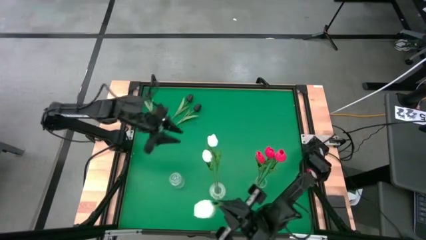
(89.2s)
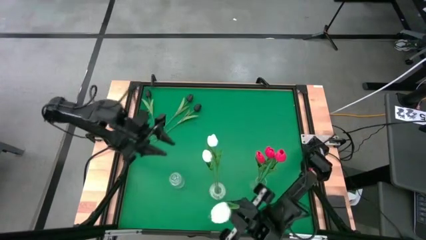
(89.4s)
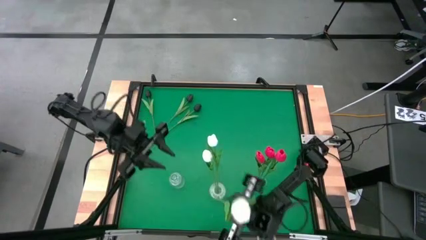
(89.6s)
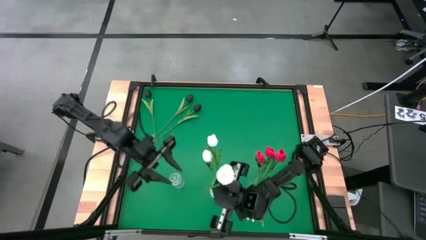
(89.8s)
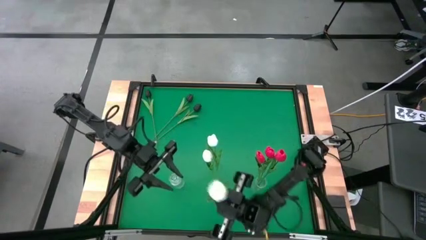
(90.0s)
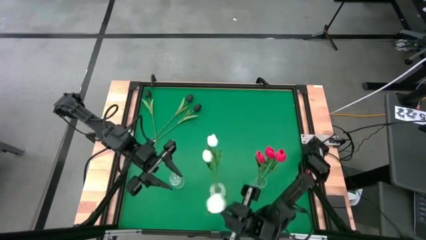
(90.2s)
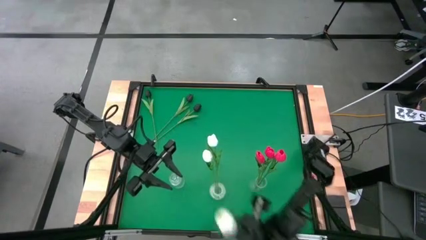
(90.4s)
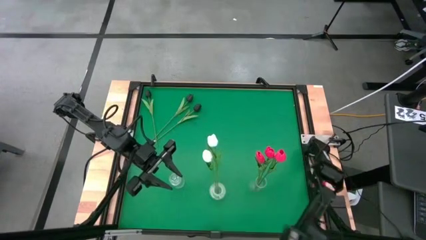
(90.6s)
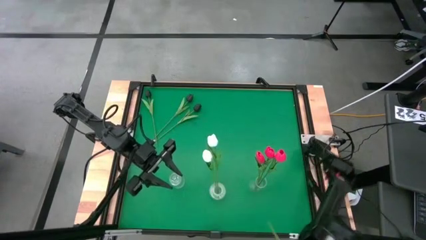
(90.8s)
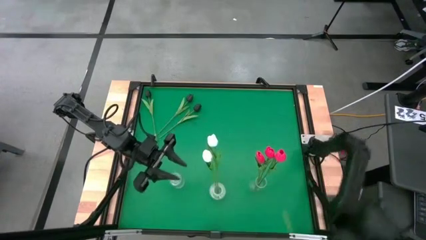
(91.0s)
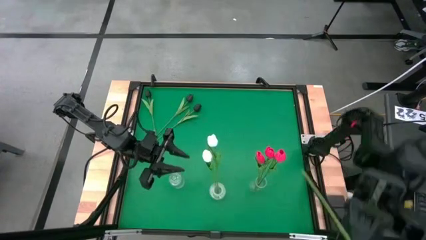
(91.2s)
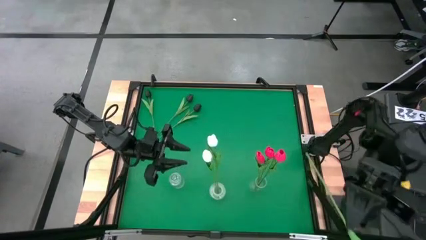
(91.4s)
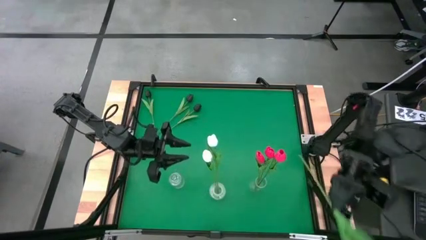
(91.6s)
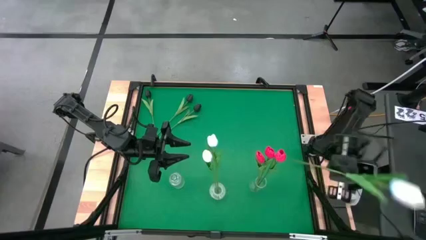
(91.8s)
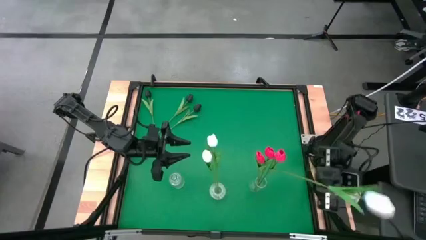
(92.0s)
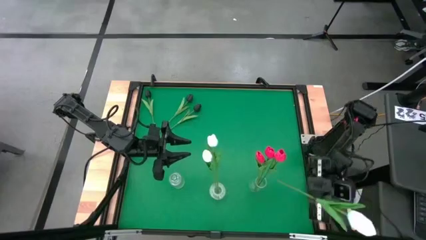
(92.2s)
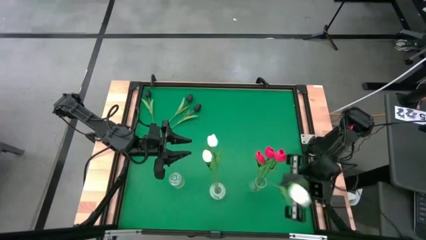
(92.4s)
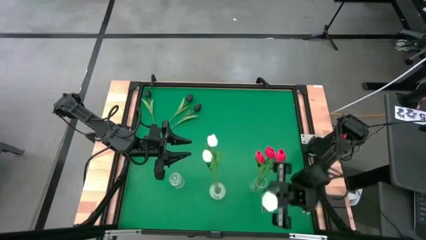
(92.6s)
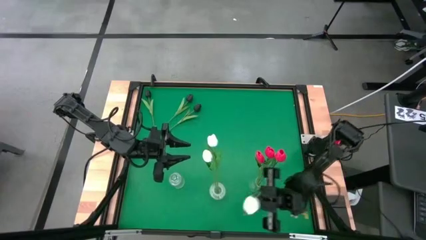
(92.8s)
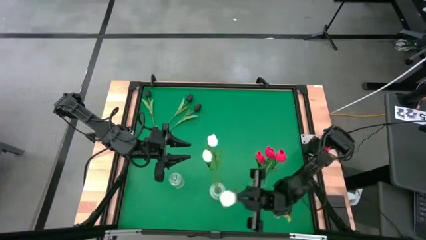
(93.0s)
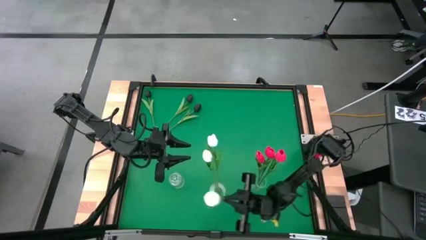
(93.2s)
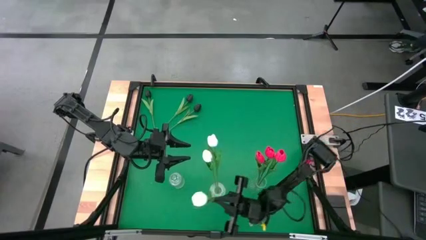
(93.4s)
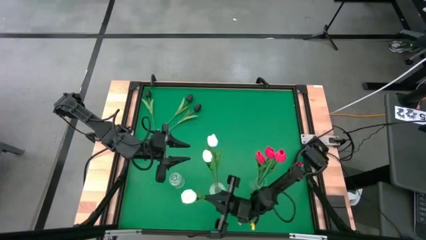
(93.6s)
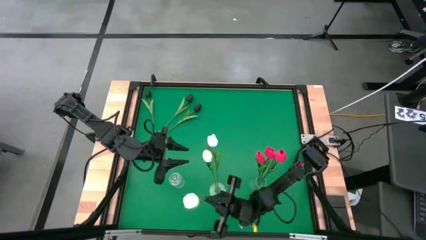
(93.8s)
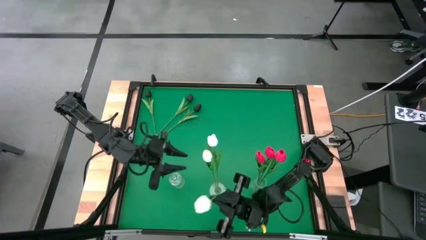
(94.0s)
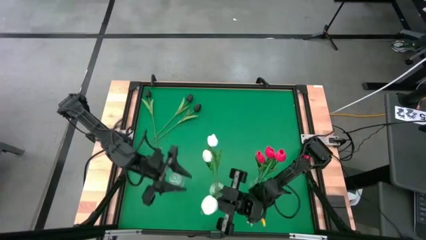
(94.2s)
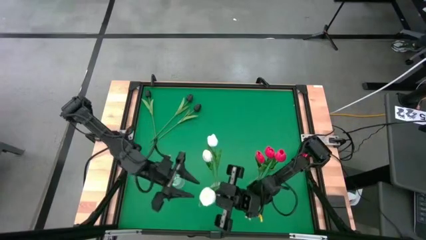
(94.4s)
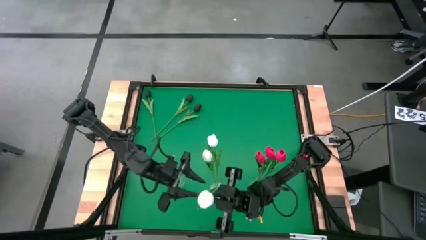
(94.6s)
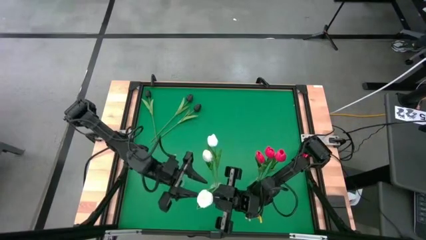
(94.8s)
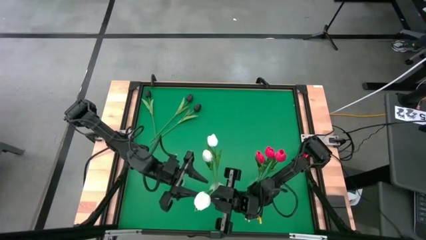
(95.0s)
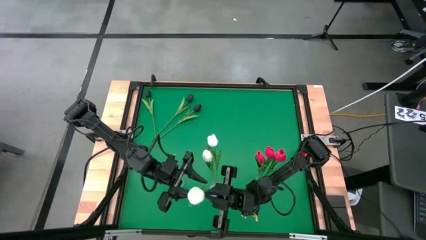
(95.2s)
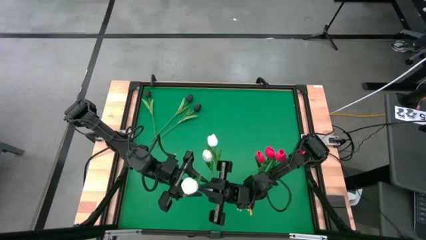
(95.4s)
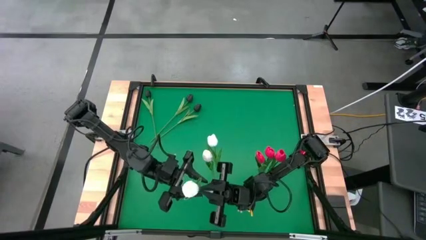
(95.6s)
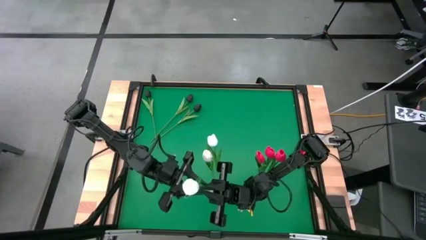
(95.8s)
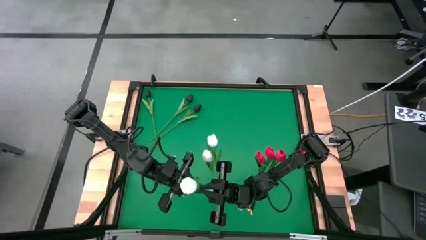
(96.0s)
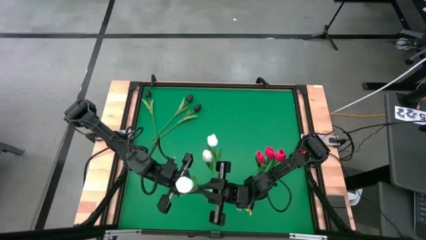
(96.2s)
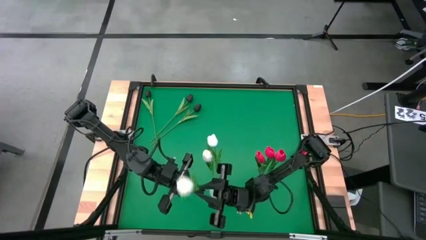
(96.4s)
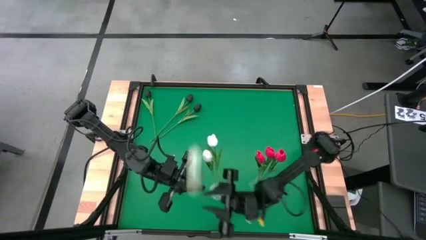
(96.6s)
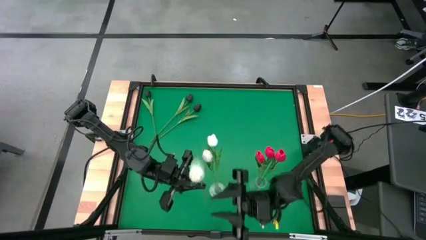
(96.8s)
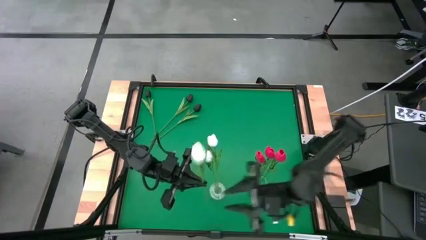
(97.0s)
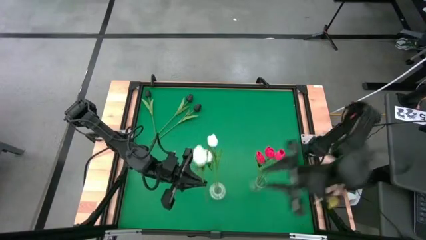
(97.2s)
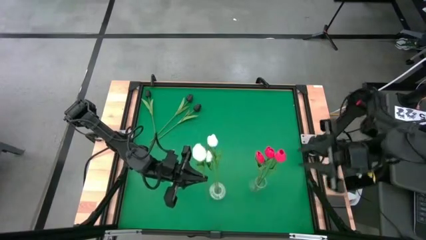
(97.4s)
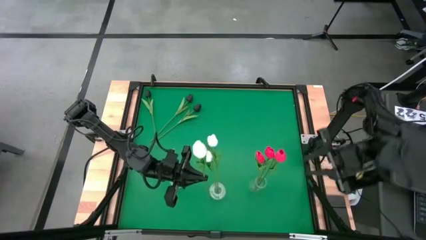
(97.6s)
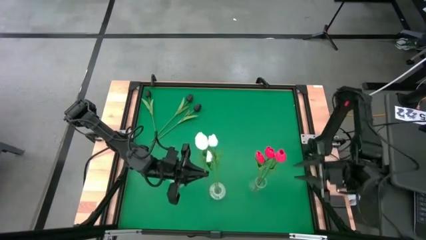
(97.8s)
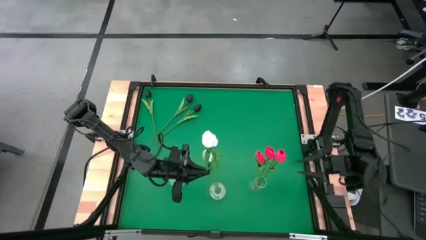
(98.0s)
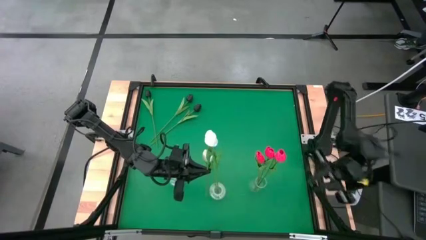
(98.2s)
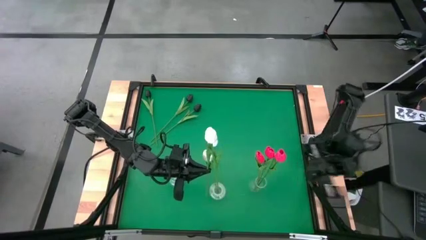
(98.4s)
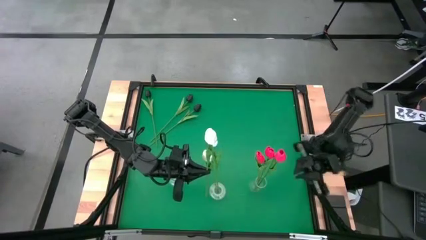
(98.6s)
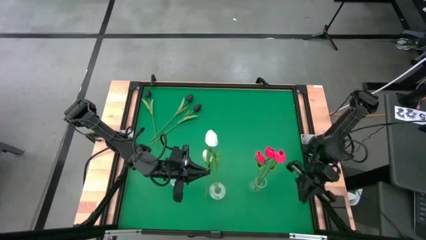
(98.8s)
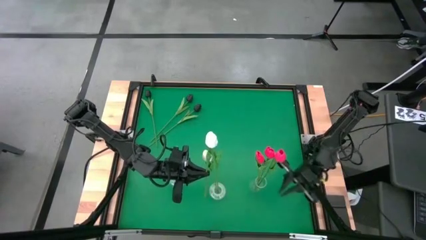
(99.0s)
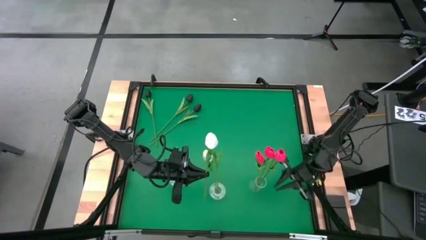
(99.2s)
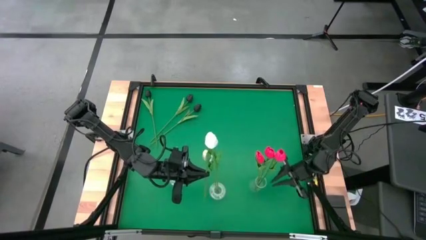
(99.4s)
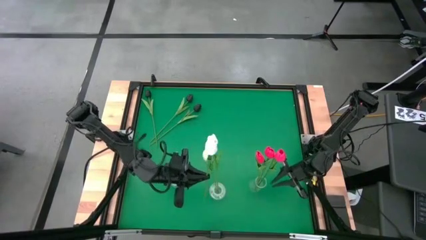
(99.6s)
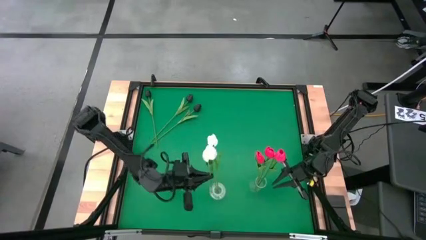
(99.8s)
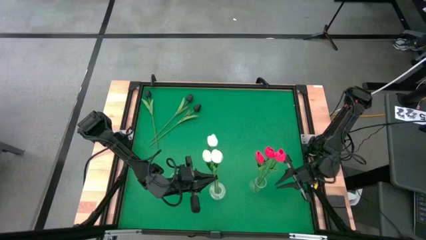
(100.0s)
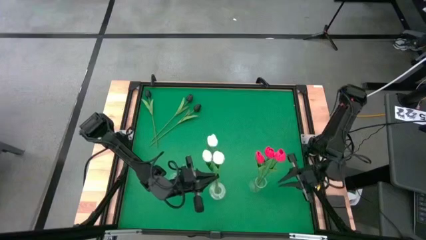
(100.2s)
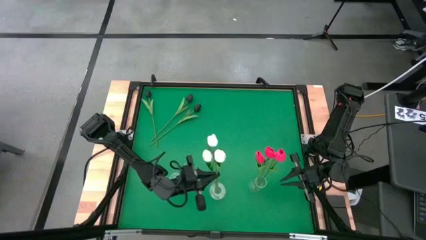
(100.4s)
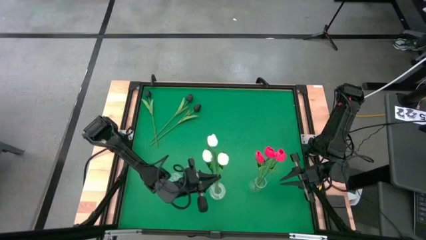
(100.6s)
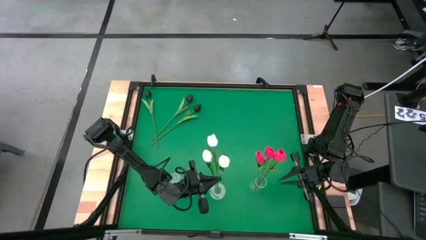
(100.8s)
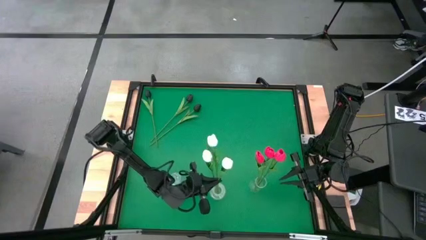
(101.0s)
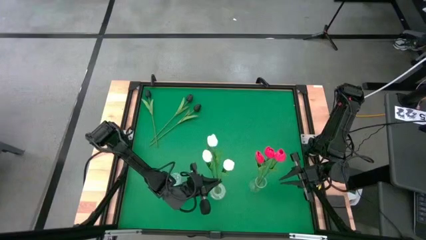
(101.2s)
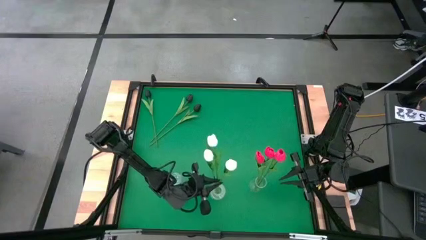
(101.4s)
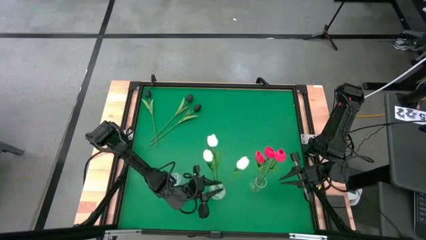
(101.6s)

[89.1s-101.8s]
Task: Sort flowers into vase by color
Put the white tulip into the middle transparent vase

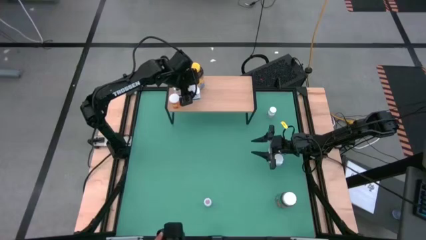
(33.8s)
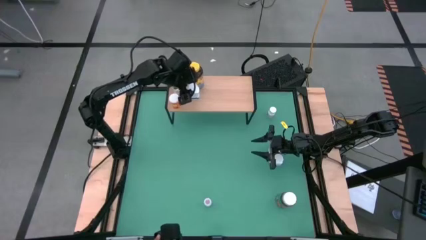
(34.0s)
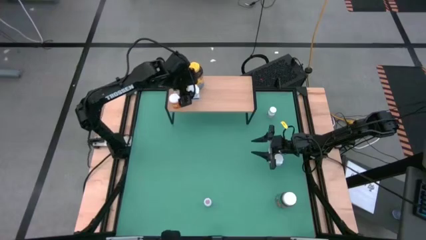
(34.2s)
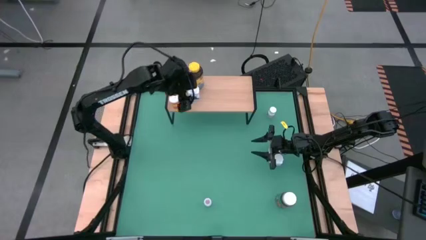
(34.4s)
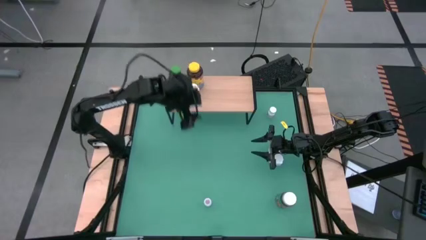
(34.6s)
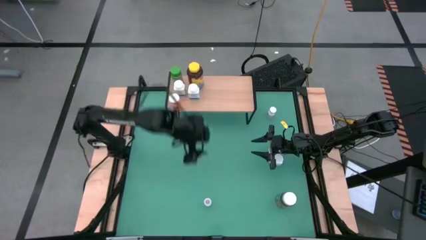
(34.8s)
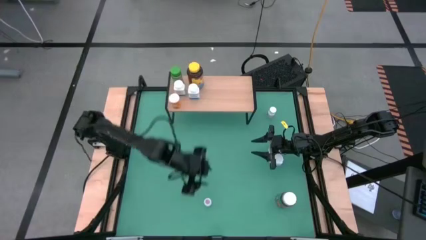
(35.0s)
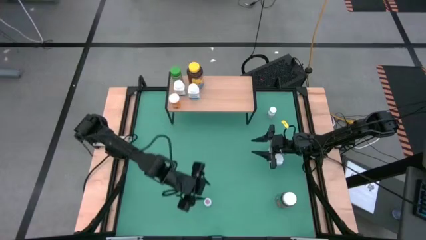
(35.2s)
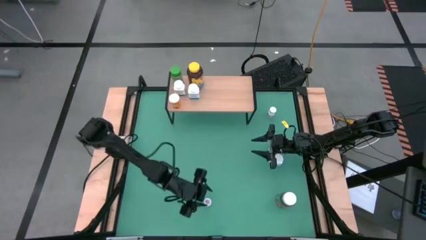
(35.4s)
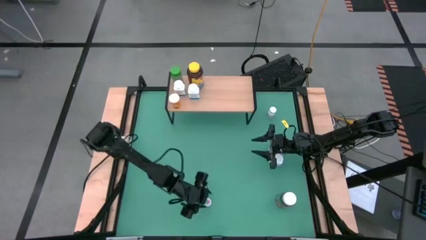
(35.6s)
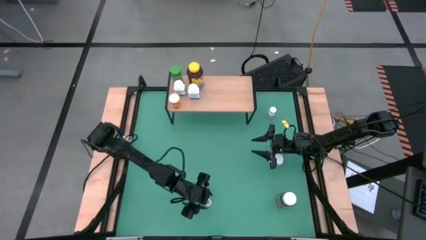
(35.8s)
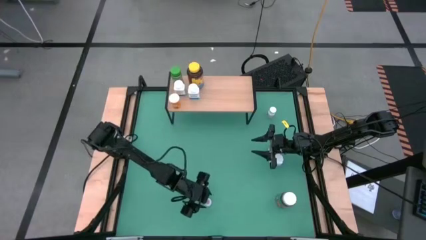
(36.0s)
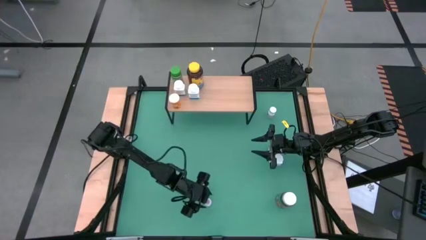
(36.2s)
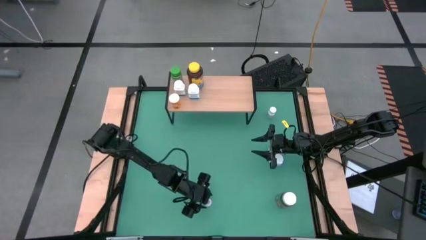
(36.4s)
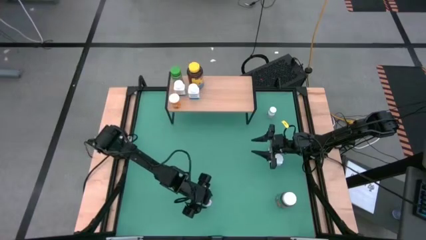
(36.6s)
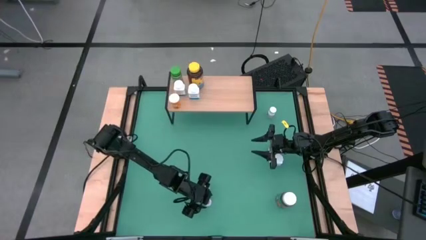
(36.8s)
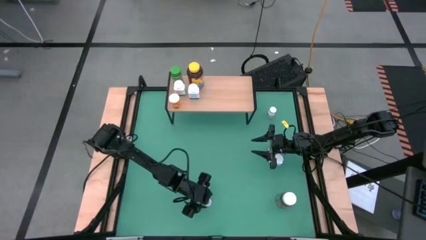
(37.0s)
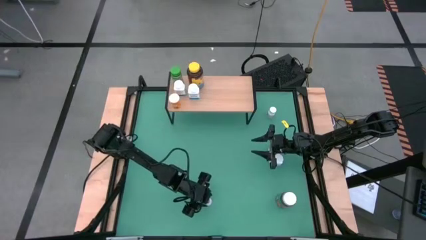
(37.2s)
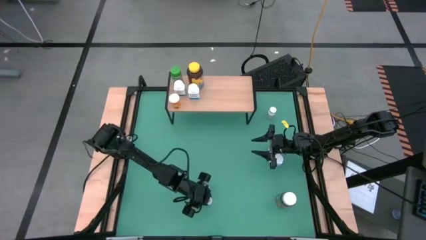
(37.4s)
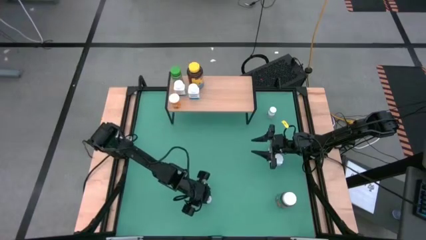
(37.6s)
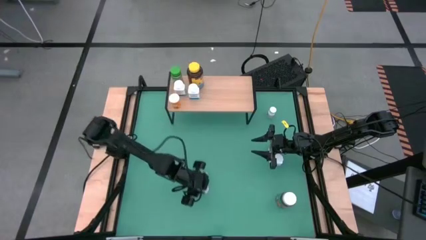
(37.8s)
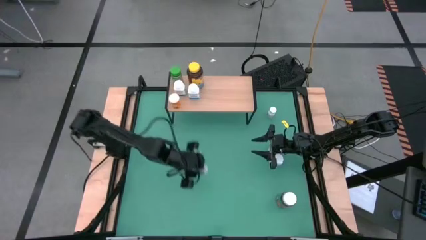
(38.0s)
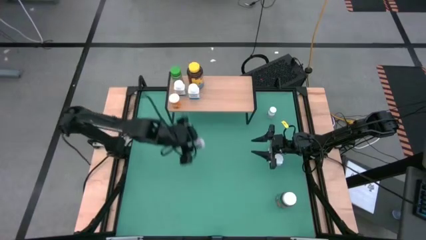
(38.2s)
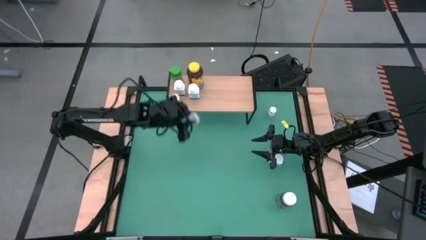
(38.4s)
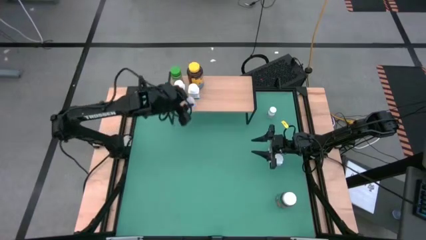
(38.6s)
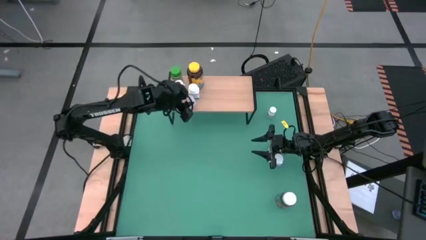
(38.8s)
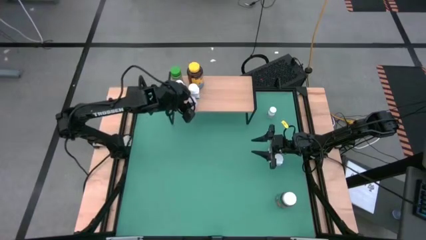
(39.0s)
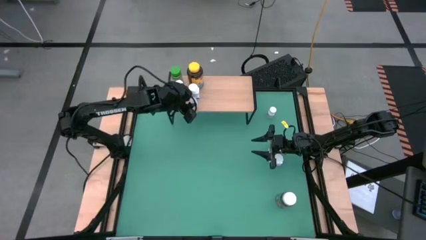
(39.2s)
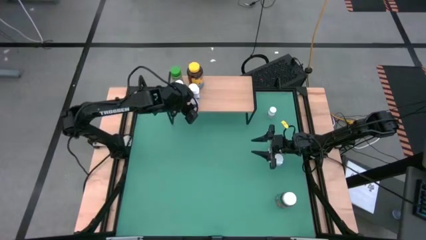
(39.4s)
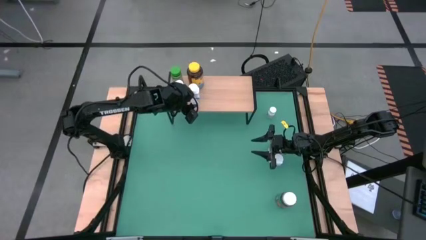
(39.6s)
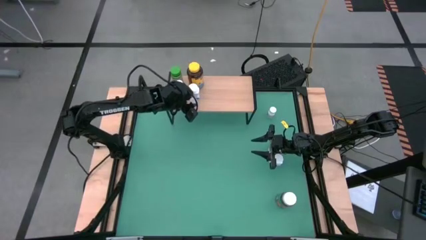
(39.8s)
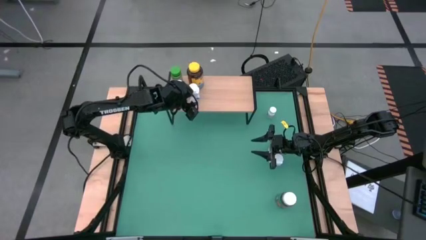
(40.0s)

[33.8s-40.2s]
Task: Pick and place medicine bottles onto shelf by color
Put the pink pill bottle on the shelf
